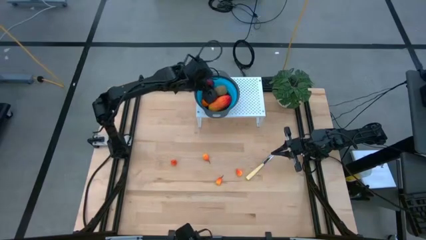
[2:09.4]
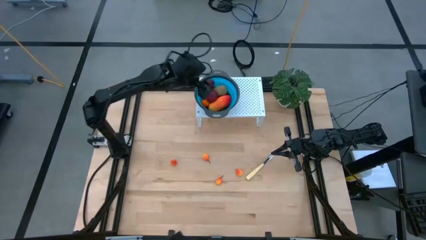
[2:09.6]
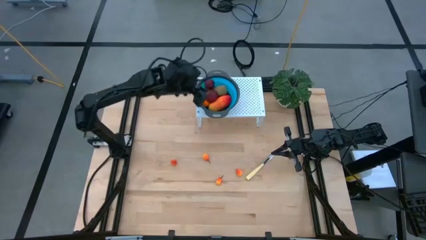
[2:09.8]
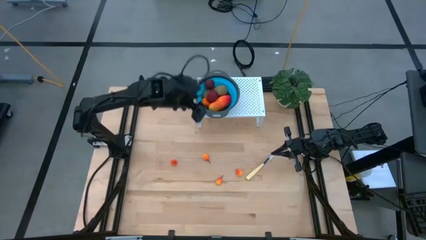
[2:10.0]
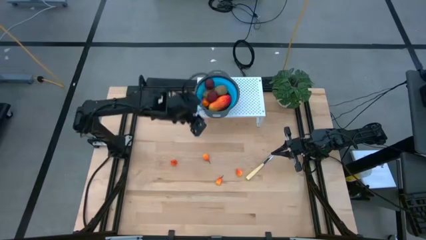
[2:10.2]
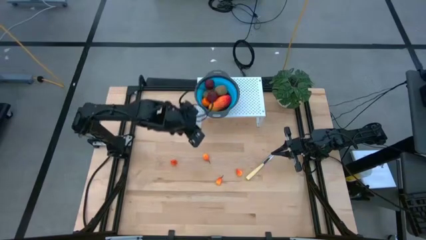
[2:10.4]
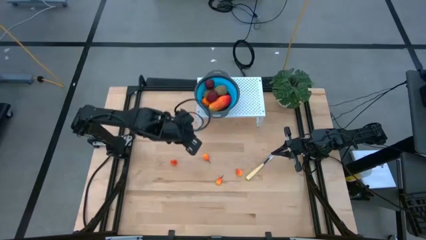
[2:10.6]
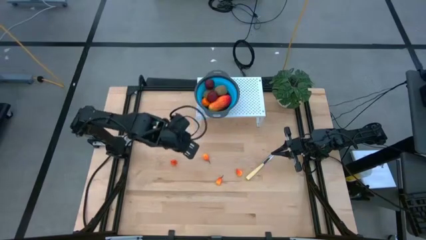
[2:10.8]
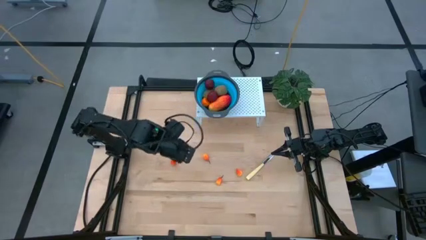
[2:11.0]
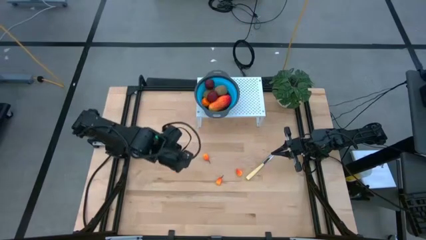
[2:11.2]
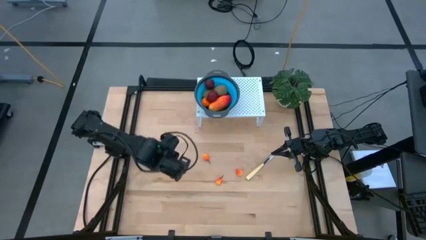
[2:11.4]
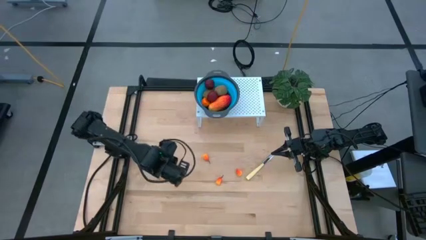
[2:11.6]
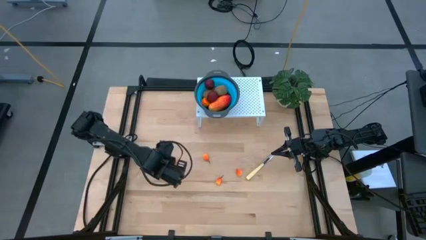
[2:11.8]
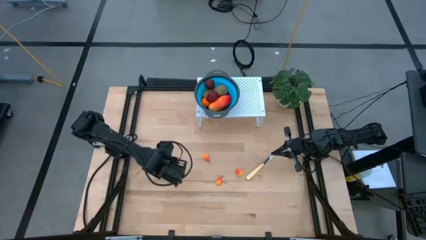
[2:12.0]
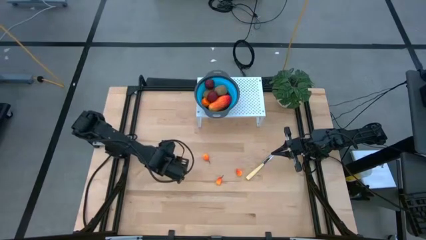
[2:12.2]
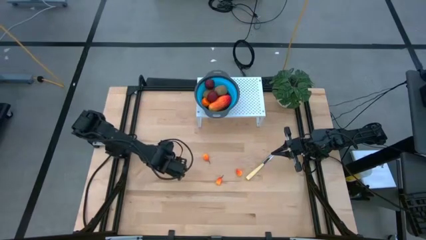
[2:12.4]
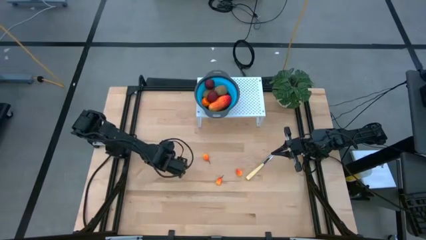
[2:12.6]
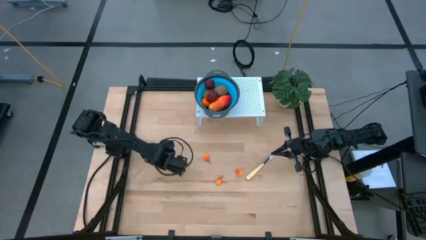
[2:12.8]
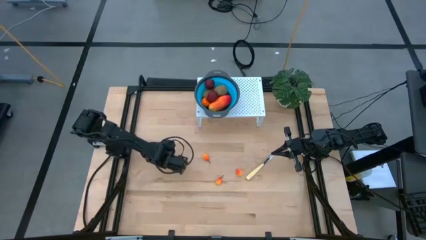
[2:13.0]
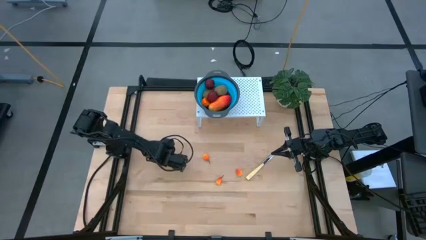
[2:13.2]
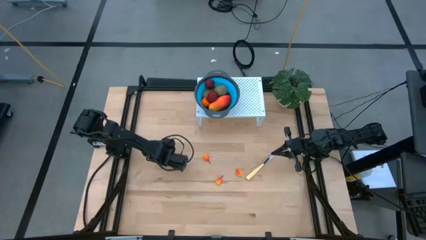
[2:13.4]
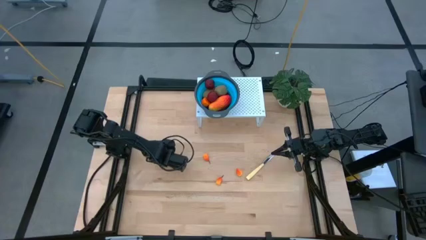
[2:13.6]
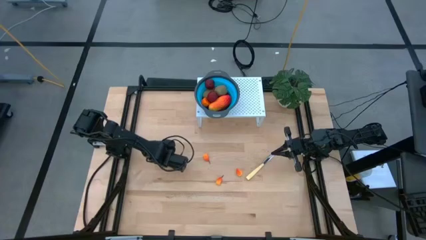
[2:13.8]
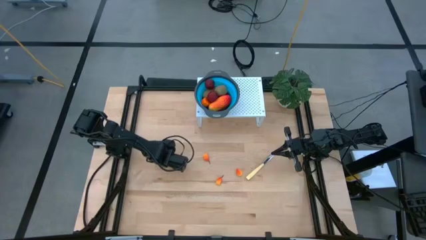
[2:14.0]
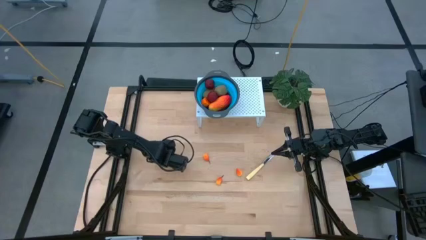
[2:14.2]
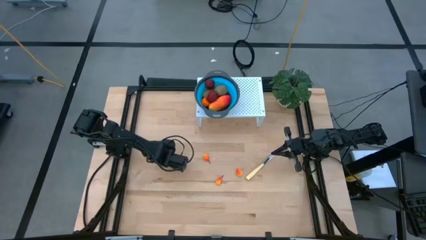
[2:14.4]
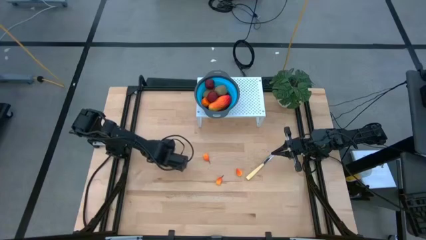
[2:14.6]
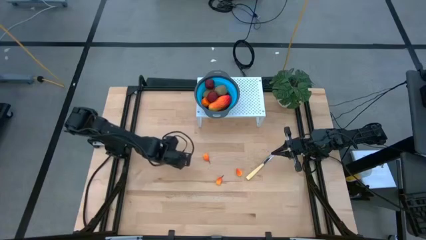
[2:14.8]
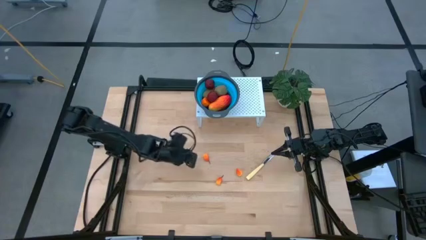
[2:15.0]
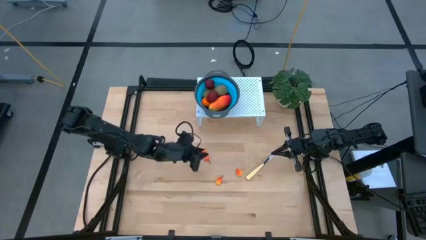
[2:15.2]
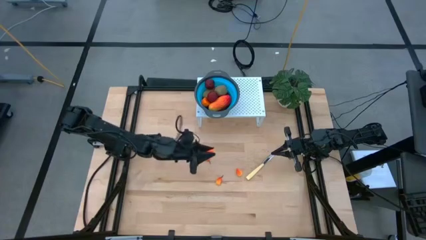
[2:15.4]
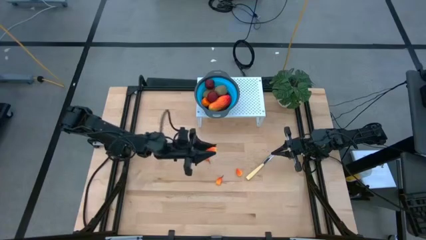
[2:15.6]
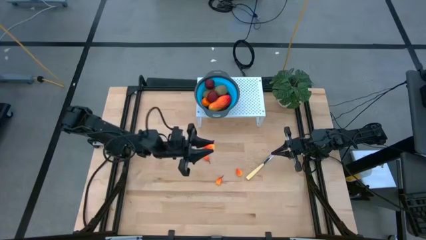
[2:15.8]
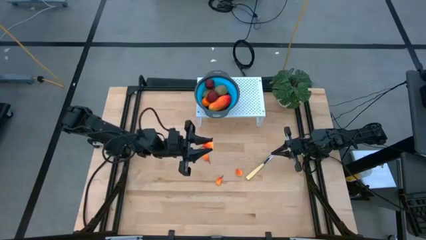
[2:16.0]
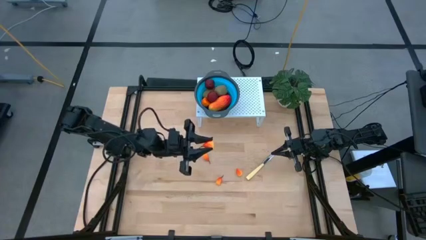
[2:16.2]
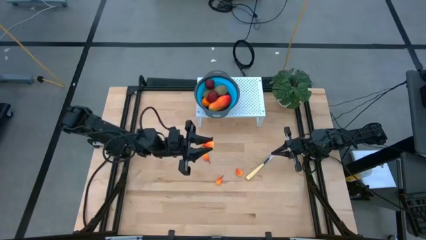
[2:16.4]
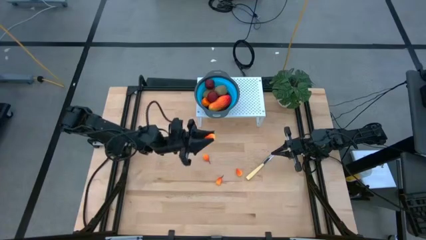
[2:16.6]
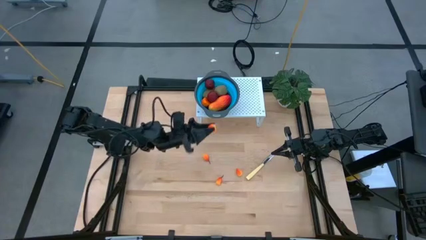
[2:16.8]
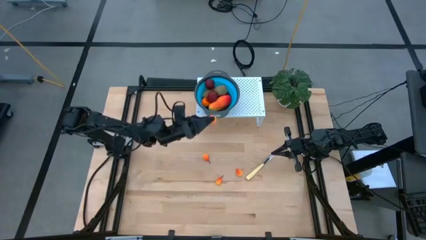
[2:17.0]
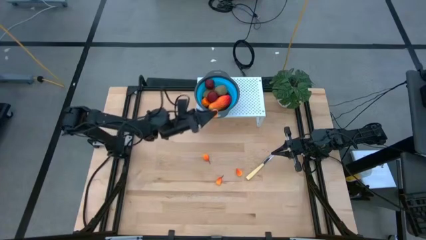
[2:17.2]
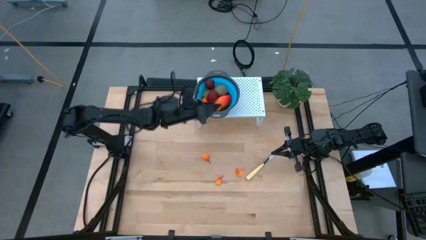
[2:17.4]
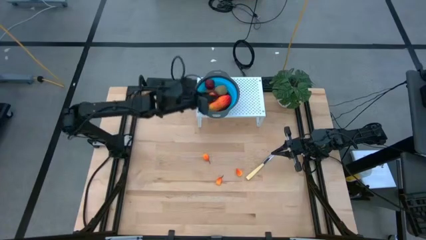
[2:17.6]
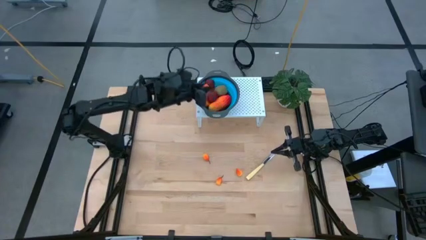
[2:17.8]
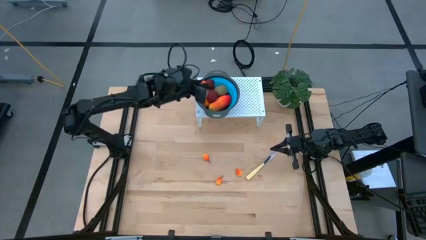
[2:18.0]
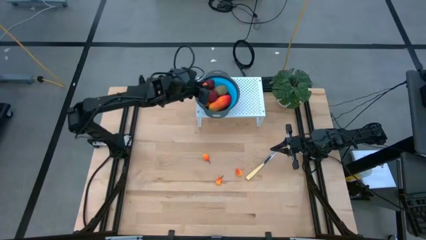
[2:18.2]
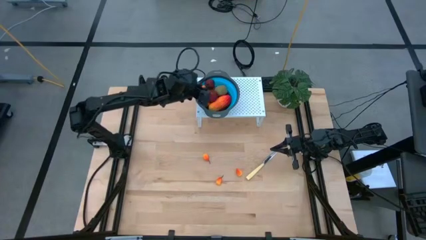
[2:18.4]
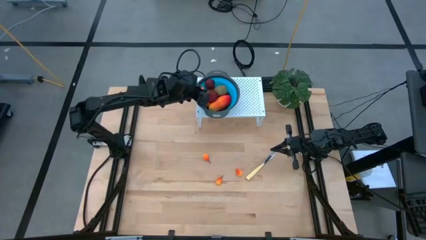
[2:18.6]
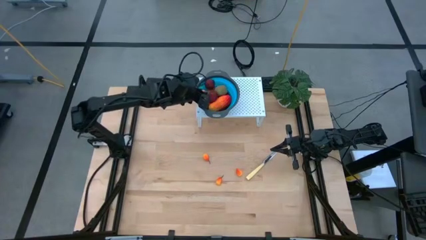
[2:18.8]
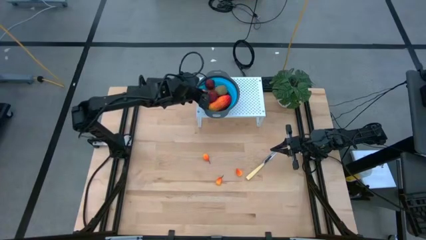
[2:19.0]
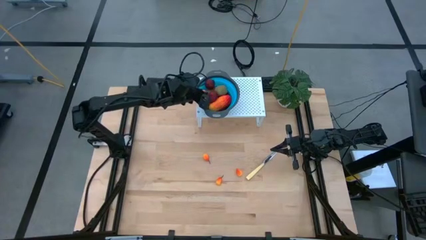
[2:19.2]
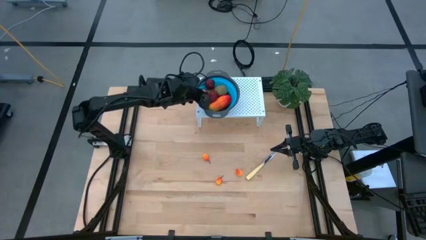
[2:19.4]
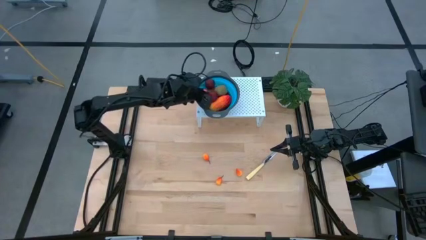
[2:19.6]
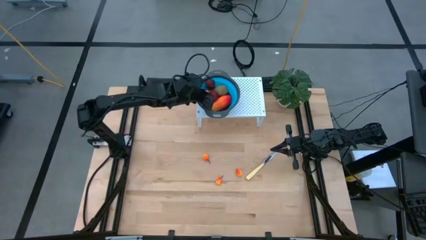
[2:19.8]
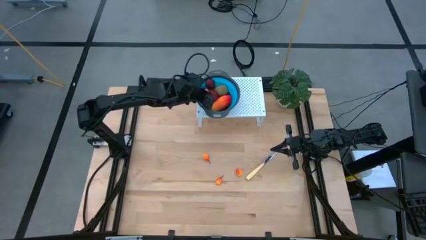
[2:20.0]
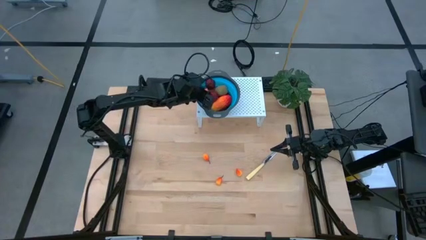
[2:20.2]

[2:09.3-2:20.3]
Task: Pick & Place Fruit
Put the top left pear into the blue strainer bowl on the shelf
